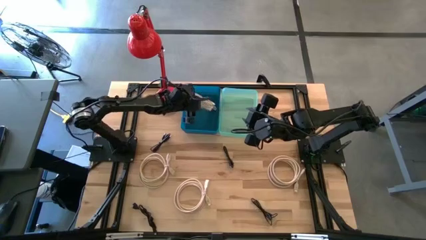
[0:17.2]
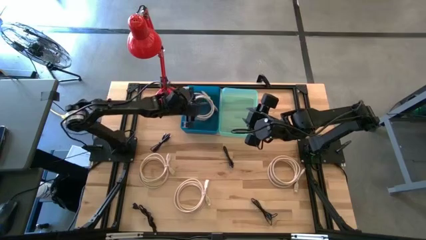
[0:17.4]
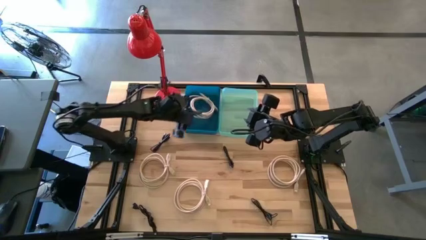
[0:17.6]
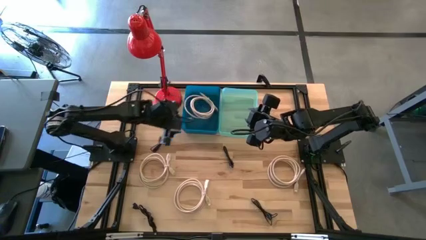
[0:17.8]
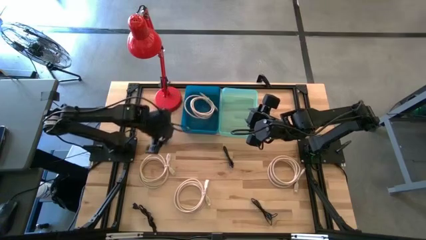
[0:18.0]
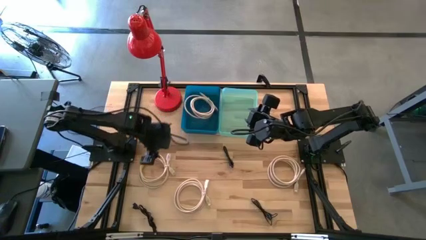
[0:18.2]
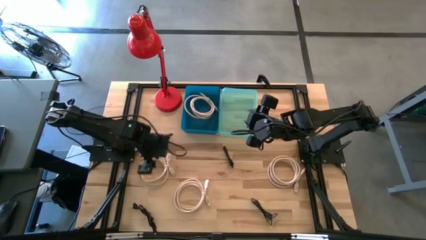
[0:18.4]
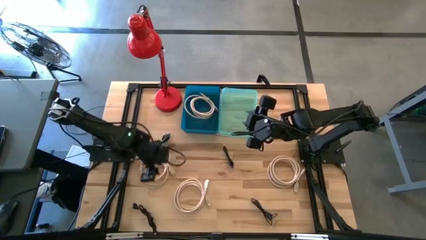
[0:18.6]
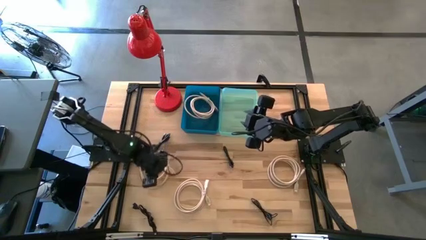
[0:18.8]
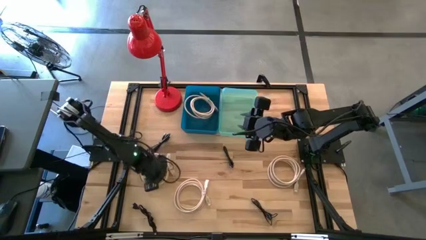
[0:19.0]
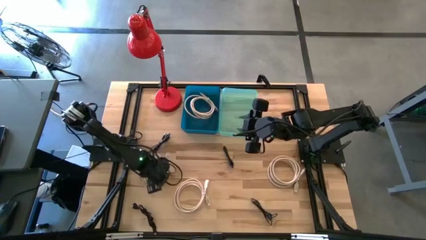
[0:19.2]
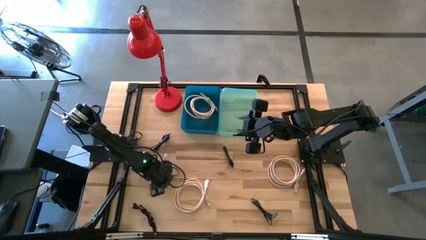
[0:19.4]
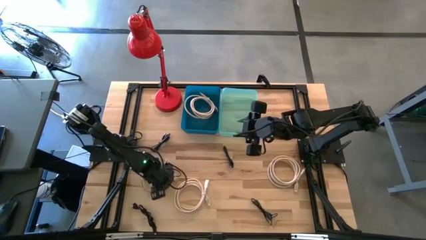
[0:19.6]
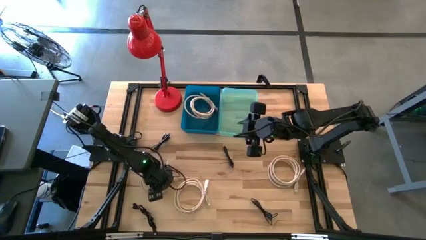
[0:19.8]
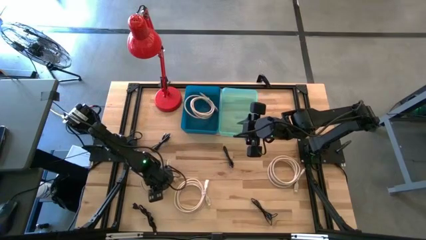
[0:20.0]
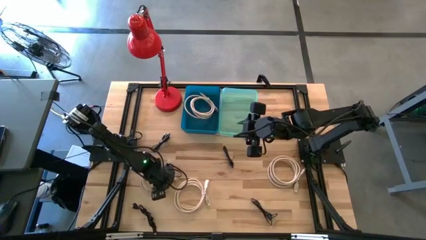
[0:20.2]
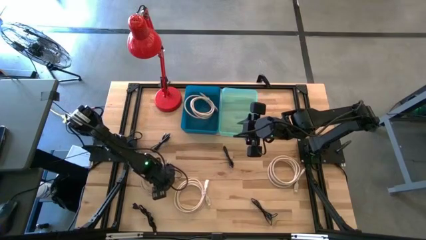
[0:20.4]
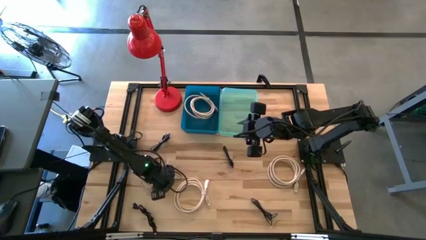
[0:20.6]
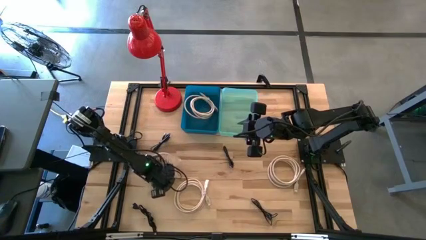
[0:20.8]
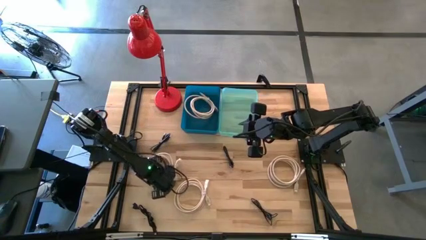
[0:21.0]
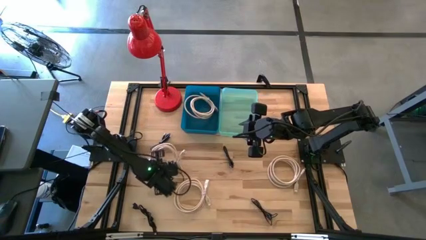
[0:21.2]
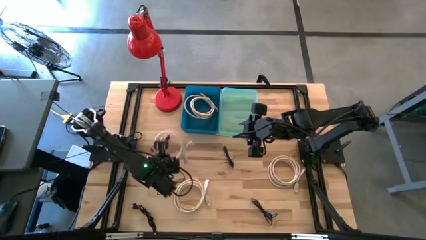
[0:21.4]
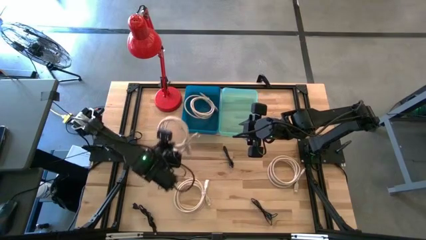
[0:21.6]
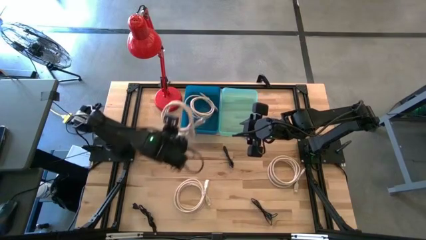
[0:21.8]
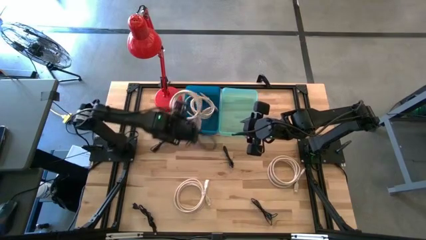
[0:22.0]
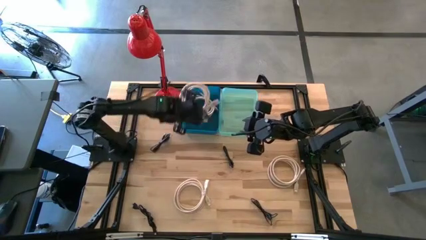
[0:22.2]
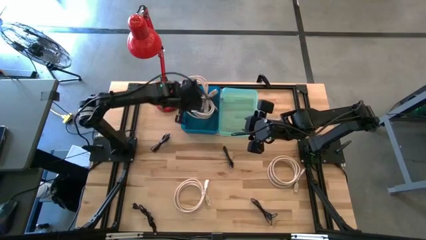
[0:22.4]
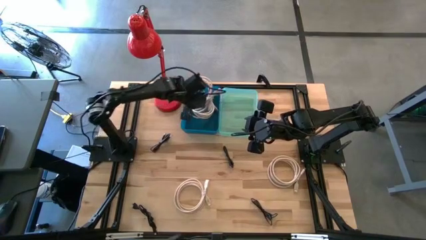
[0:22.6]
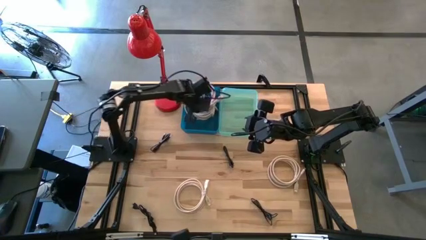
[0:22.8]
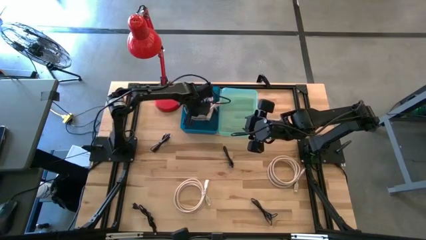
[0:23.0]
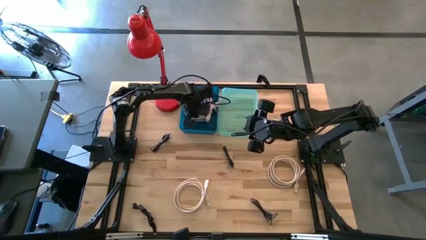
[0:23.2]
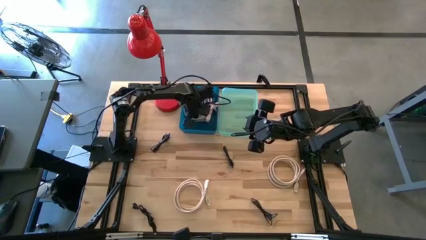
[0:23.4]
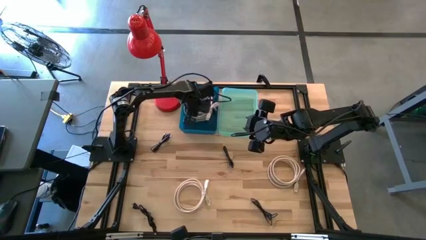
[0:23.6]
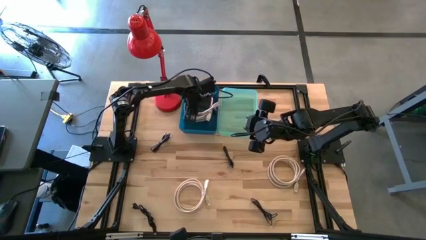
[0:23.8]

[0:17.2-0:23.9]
Task: Pick & Place USB Port
Put the white HDMI cable into the blue bin

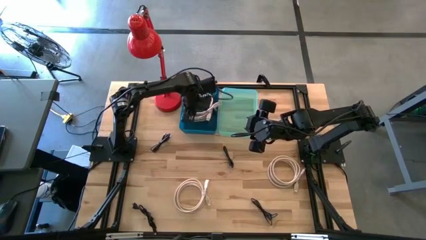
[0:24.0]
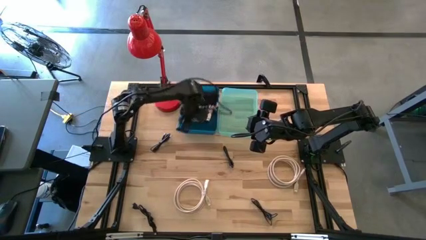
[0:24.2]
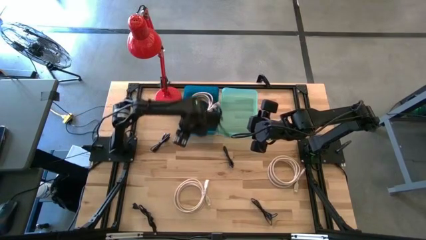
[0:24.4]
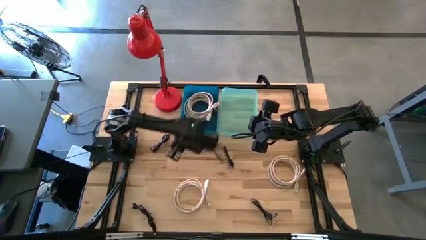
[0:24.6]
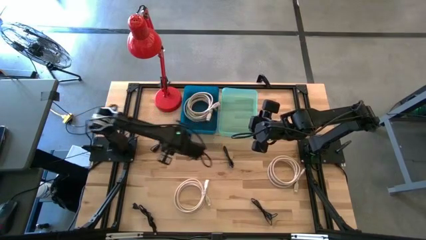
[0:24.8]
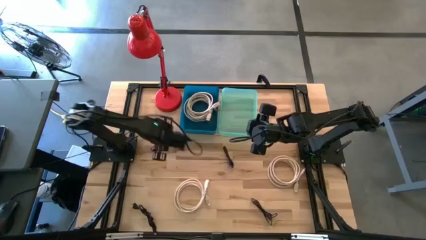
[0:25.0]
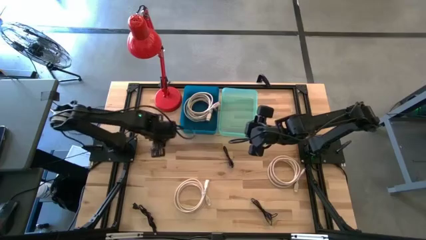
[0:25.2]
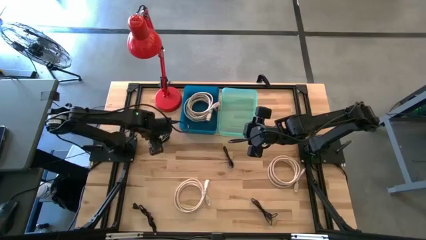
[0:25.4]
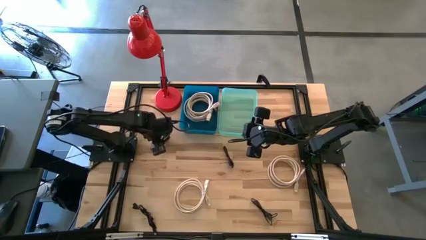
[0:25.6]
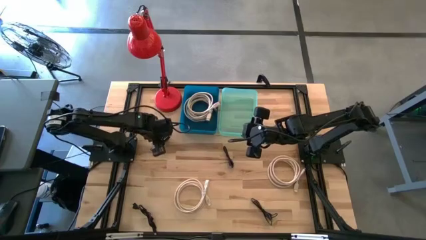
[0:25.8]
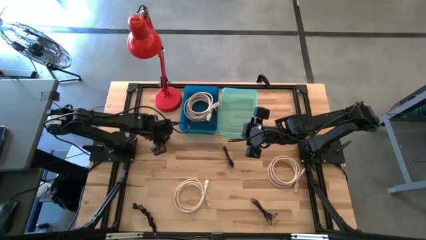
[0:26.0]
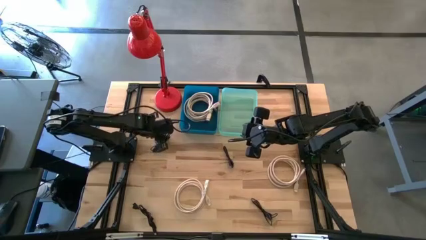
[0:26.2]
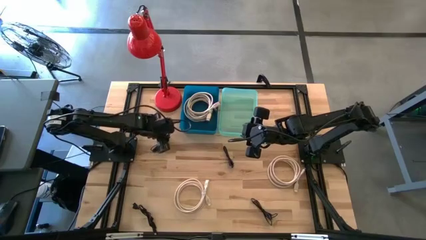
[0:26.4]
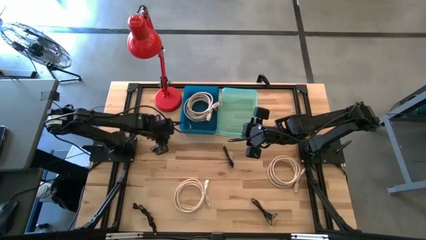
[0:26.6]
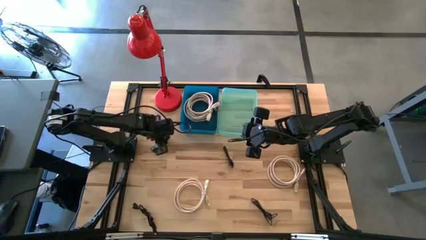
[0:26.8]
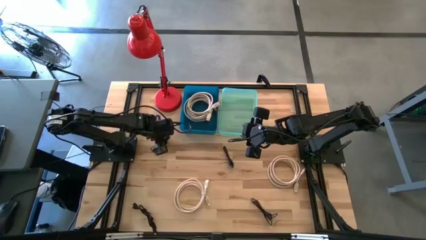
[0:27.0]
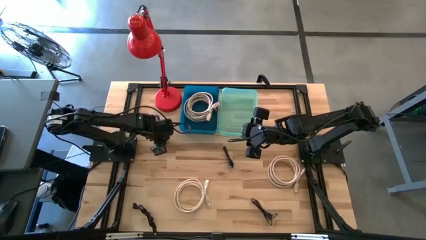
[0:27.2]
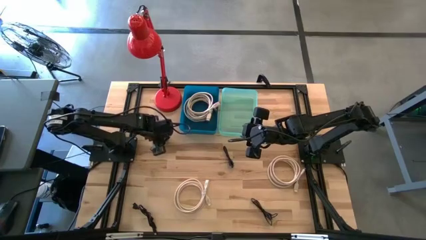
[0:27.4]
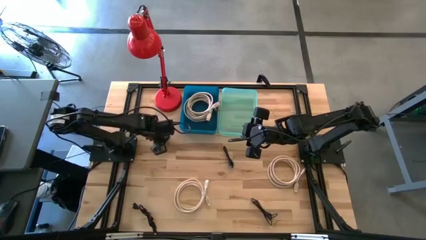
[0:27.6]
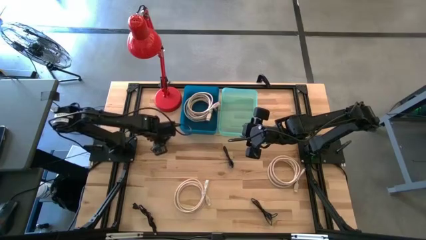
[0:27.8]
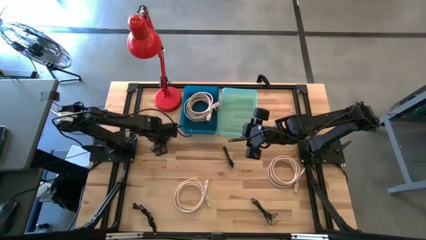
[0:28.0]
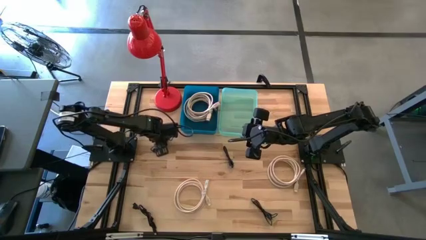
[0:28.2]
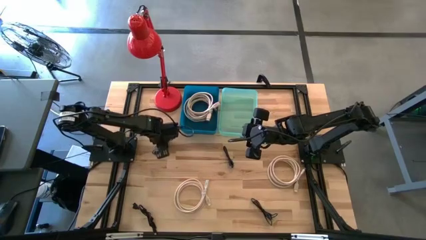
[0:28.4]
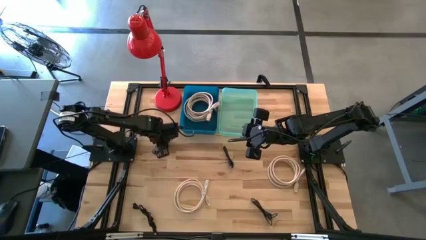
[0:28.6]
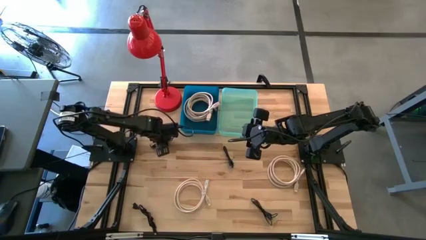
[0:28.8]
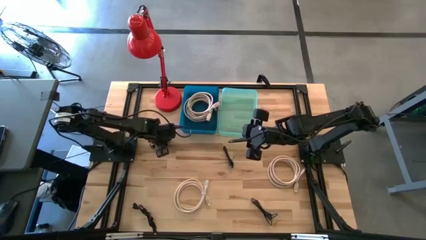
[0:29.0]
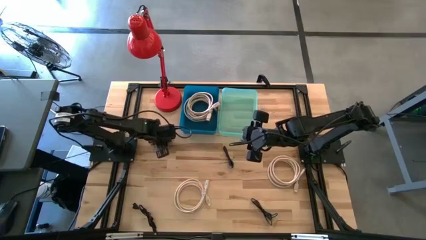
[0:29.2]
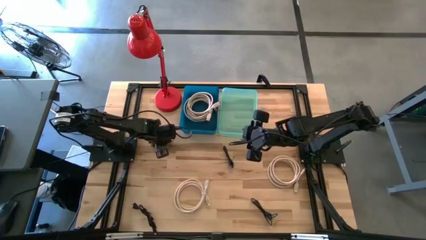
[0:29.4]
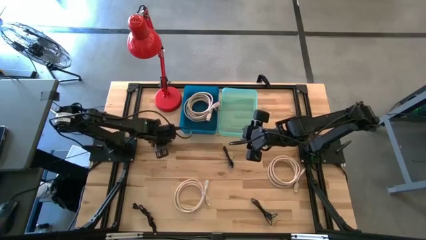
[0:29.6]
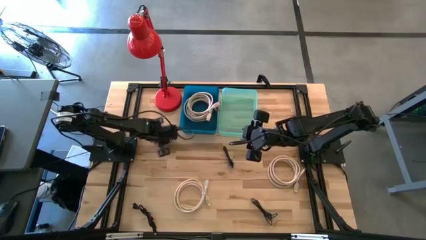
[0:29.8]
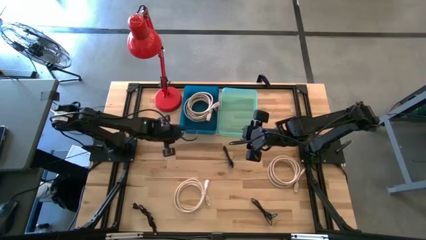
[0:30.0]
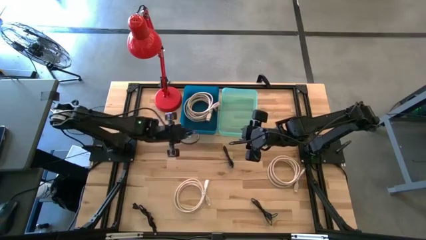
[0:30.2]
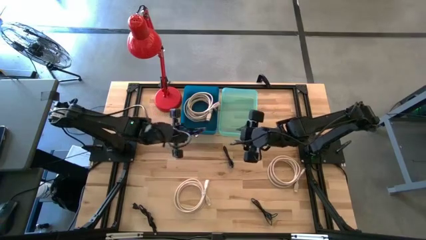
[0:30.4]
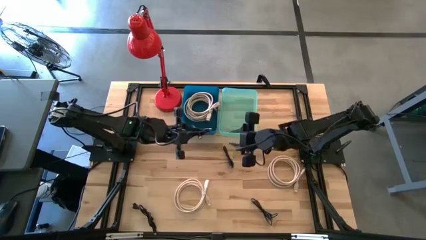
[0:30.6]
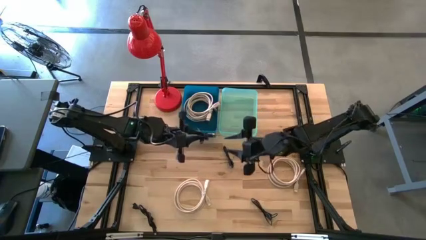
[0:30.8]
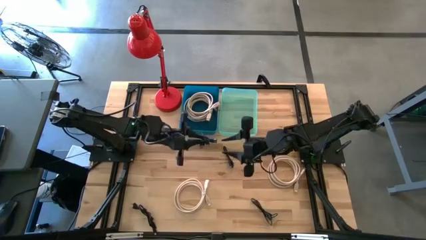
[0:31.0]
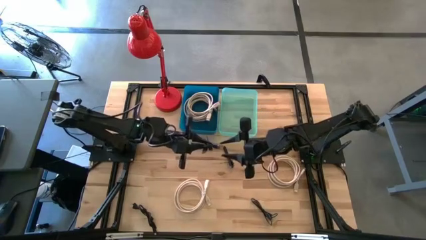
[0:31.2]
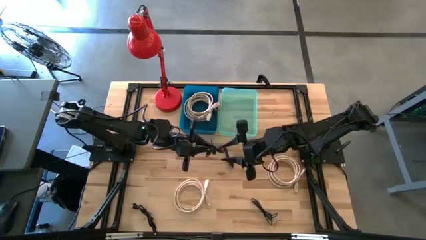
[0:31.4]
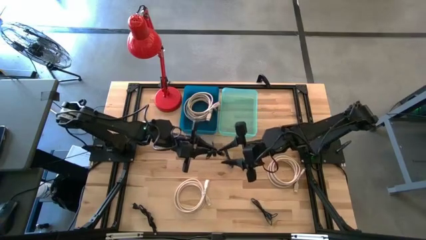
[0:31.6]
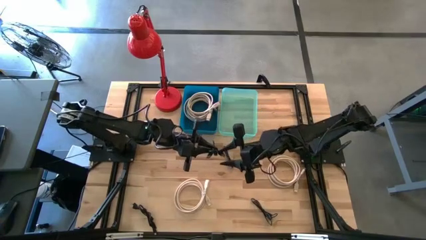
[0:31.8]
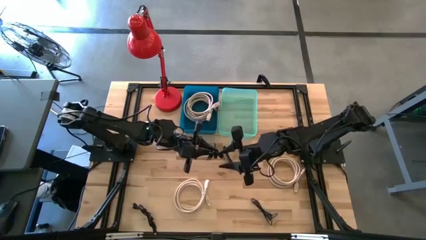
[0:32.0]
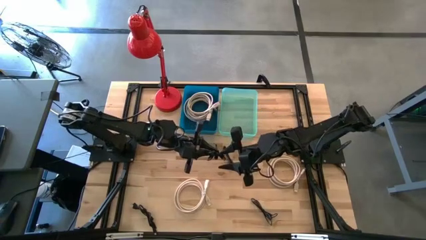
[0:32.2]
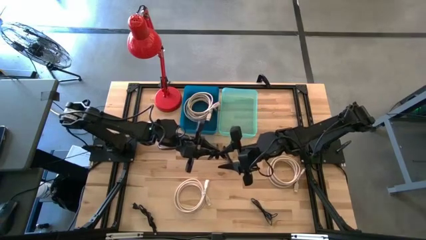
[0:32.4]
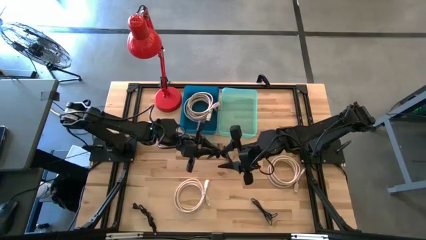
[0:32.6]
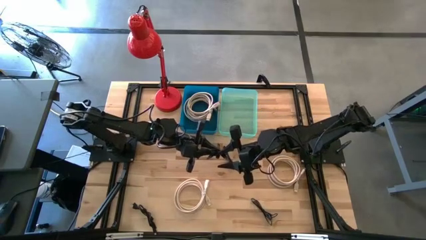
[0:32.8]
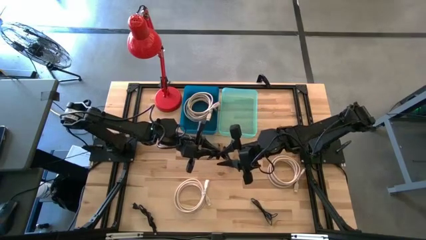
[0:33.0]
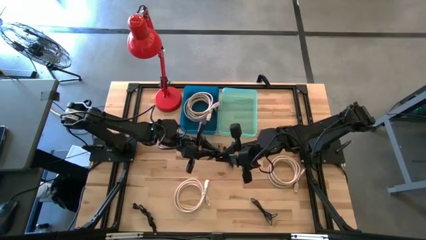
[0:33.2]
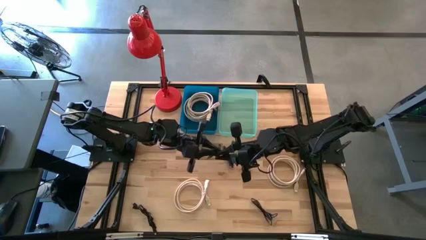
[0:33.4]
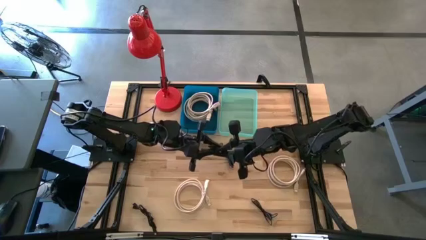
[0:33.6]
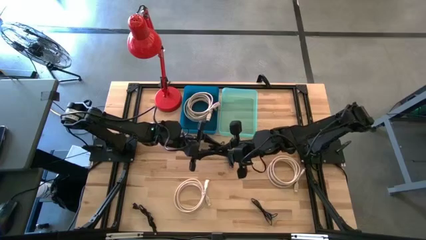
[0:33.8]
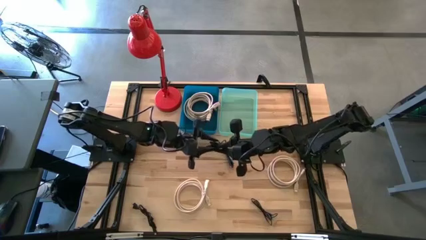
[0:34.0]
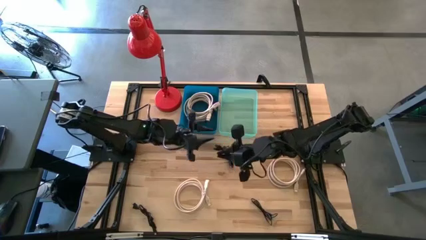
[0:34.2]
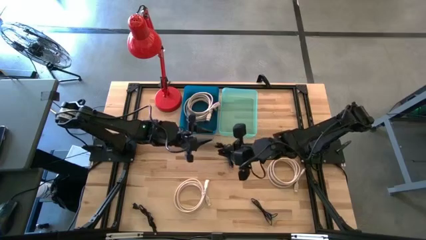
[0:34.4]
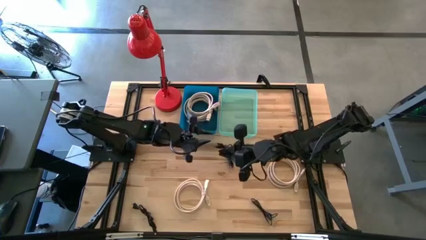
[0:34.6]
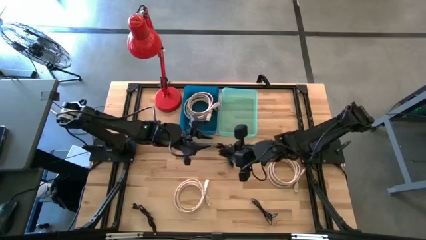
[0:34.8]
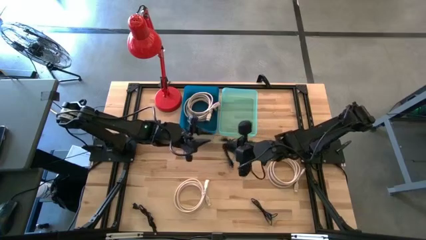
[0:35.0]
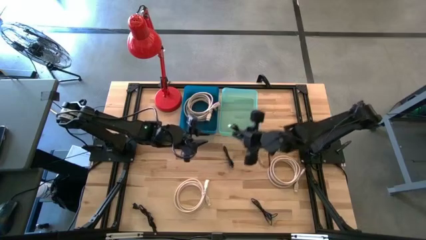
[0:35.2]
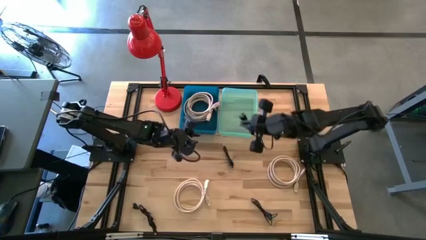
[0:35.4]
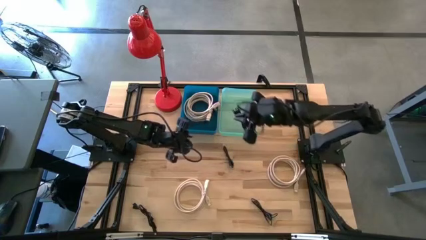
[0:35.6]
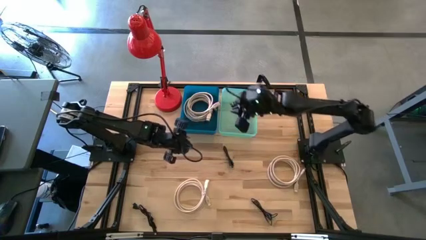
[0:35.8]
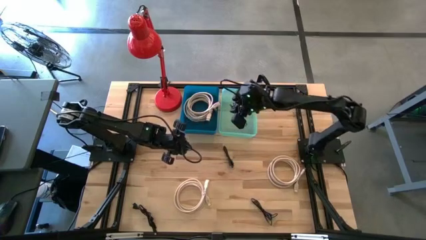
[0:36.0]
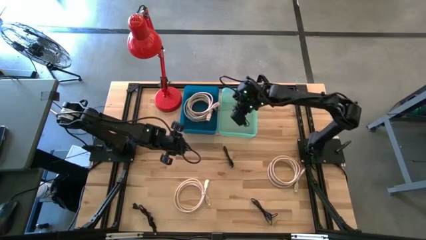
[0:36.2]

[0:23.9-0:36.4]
Put the black USB cable into the green bin
